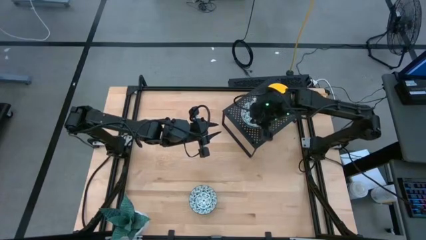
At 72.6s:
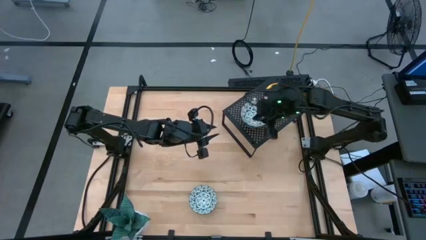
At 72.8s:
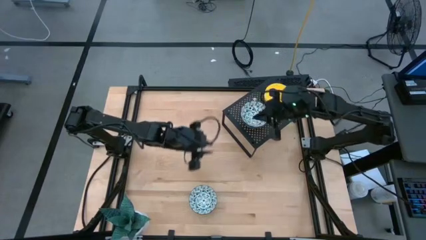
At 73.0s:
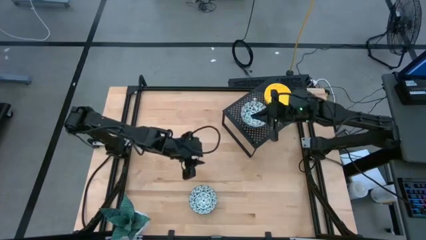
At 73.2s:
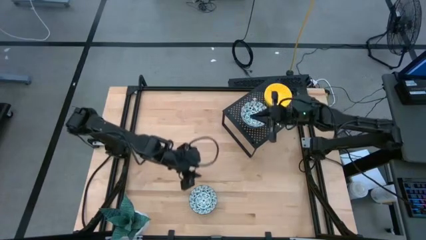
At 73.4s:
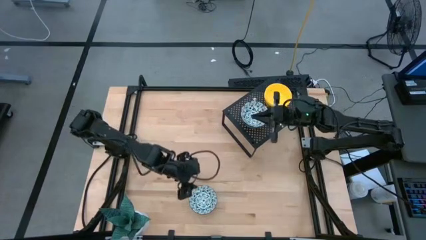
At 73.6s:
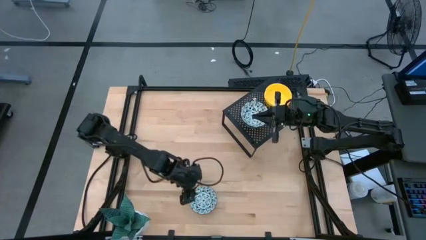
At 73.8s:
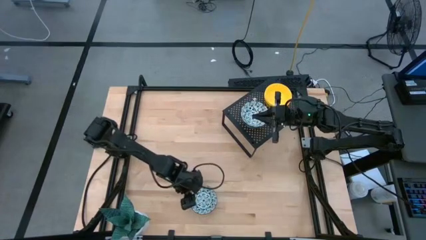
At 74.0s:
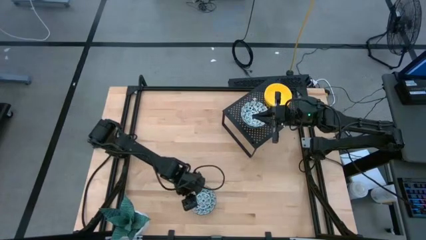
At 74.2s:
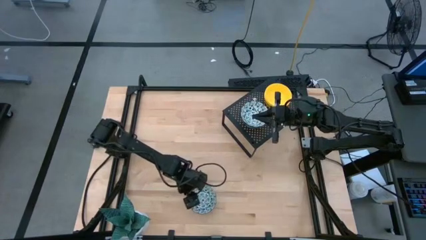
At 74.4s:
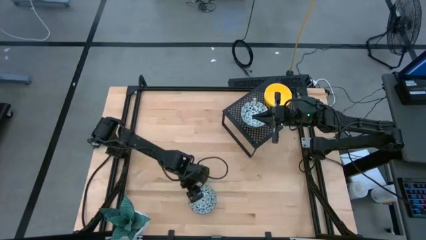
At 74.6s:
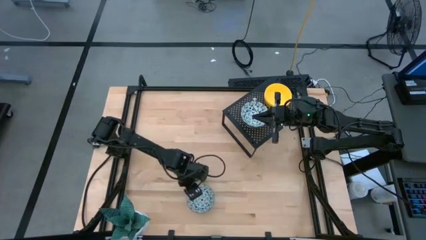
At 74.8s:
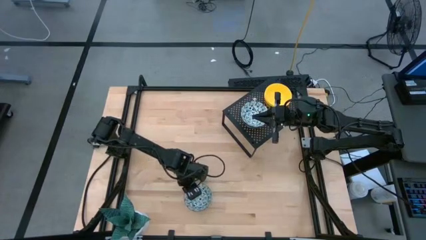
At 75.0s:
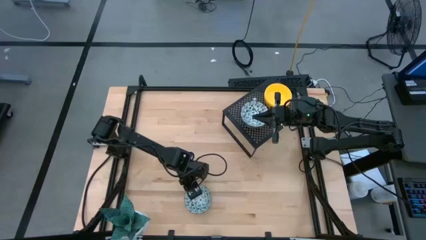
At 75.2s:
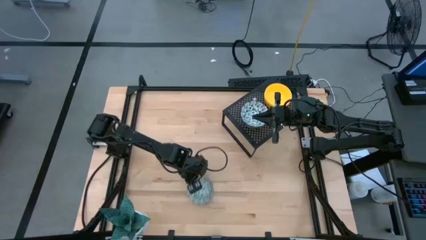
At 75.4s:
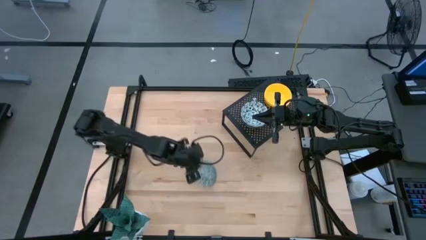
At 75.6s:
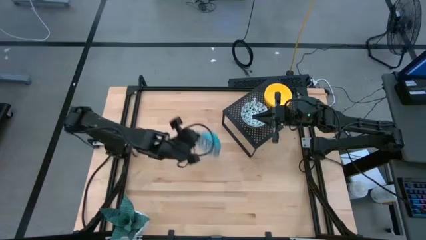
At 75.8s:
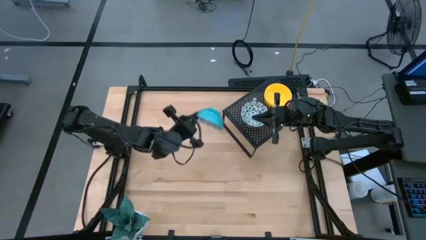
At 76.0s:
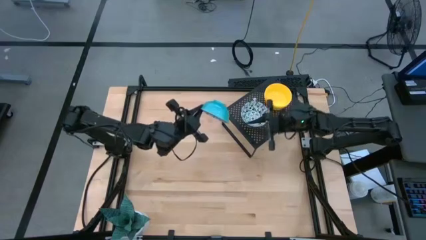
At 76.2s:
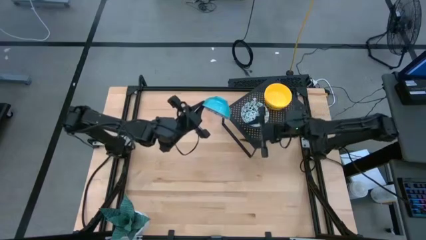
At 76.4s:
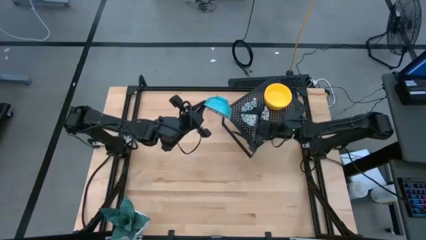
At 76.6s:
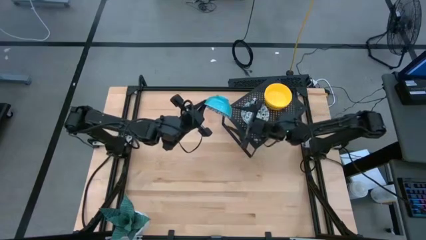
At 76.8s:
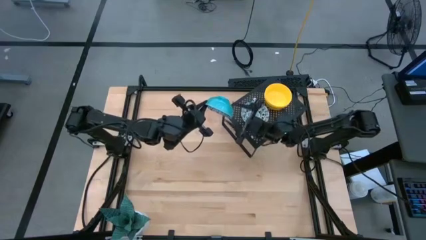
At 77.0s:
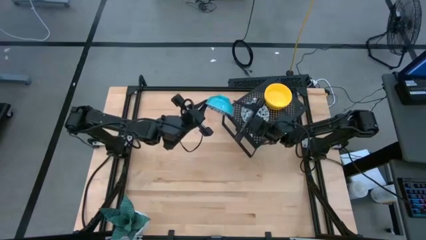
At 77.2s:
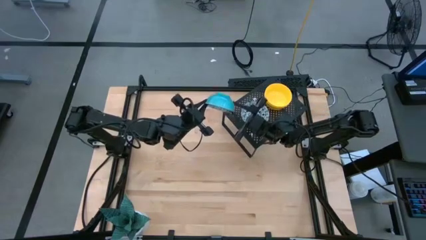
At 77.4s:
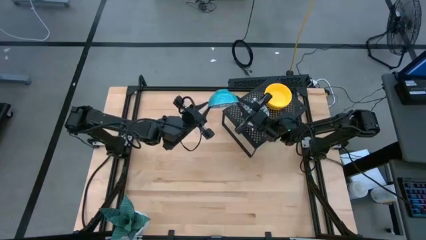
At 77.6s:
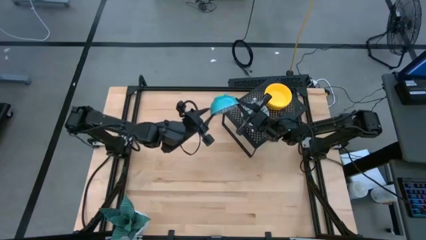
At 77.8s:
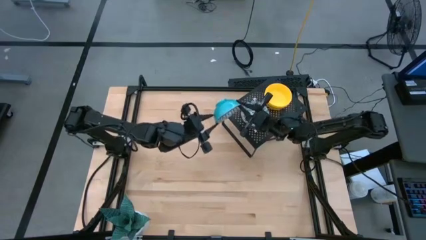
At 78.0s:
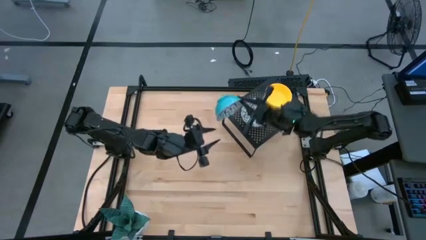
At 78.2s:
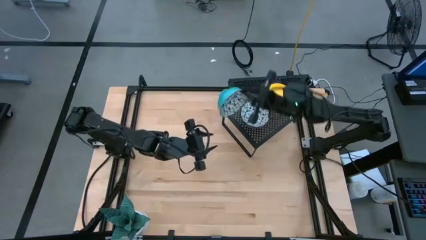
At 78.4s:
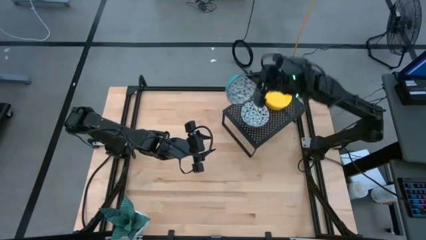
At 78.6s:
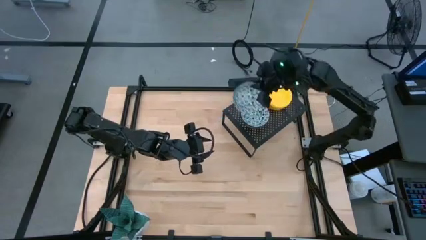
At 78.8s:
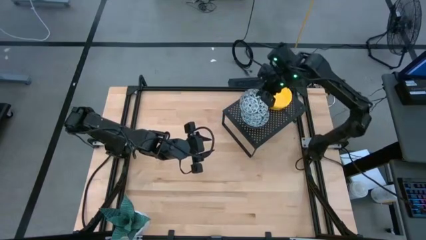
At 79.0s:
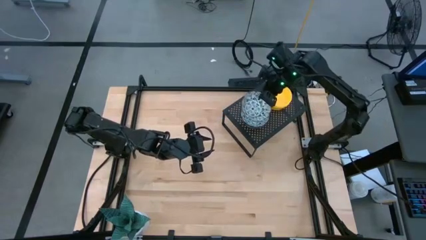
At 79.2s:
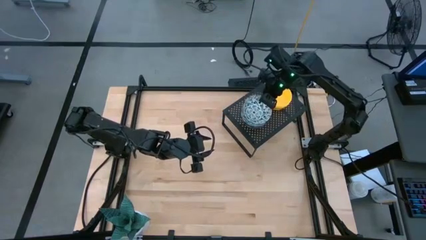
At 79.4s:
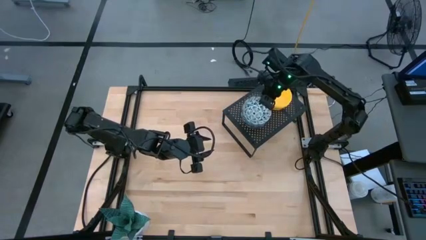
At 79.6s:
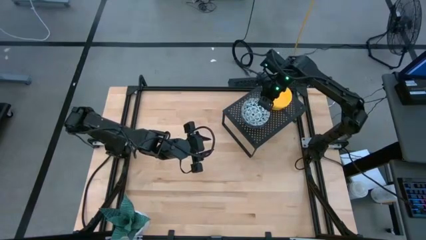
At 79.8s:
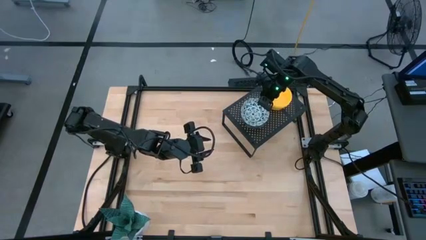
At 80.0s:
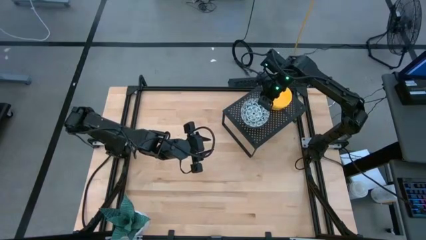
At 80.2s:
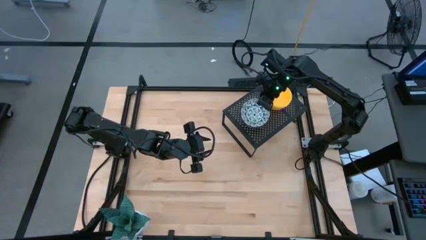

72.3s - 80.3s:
Task: Pick & Place Mini bowls
Stack the blue patterned bowl on the blue patterned bowls on the shelf

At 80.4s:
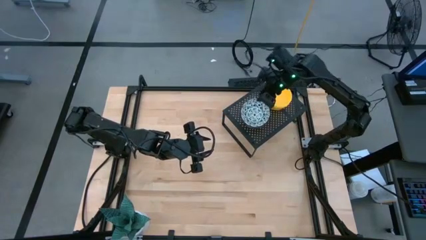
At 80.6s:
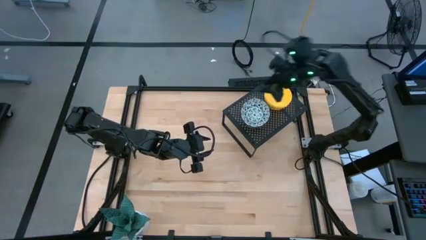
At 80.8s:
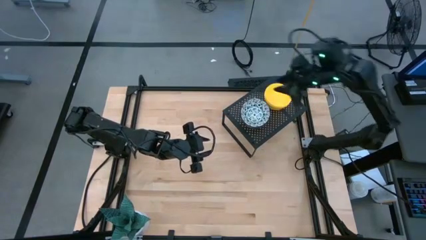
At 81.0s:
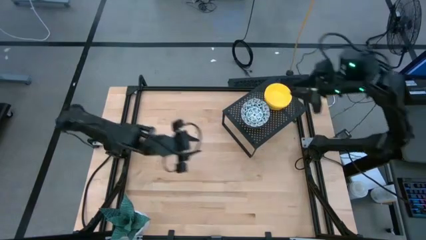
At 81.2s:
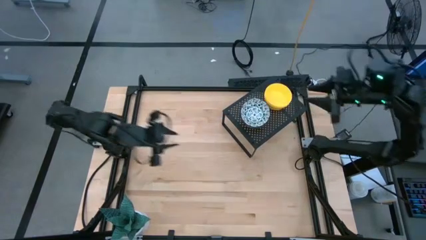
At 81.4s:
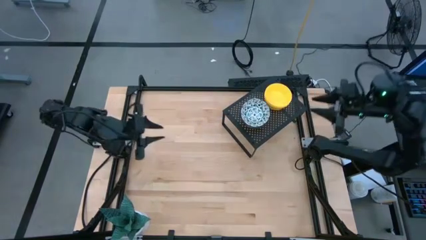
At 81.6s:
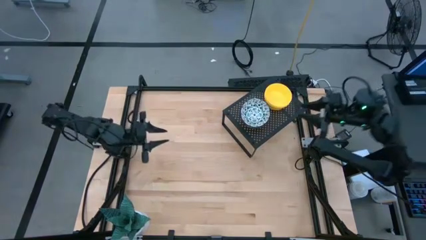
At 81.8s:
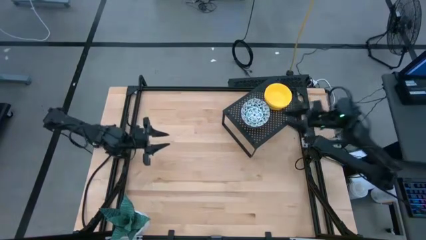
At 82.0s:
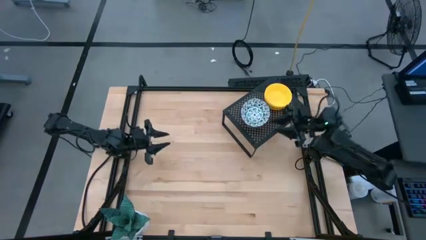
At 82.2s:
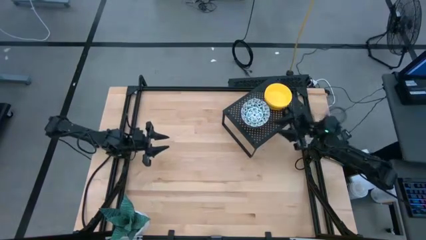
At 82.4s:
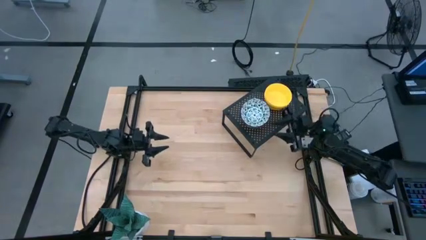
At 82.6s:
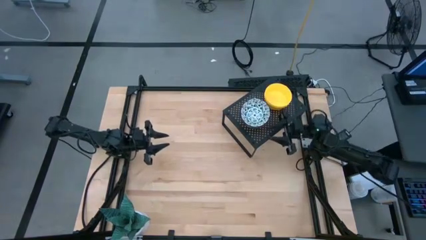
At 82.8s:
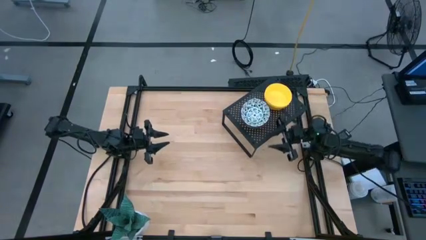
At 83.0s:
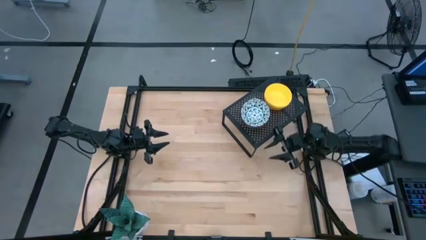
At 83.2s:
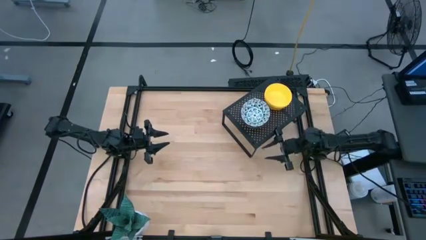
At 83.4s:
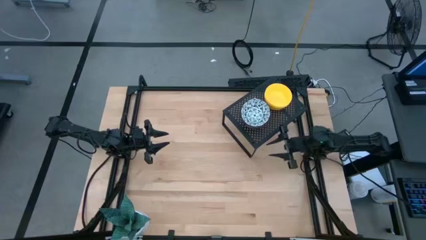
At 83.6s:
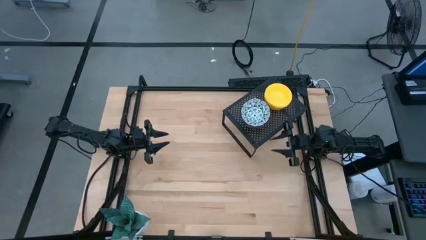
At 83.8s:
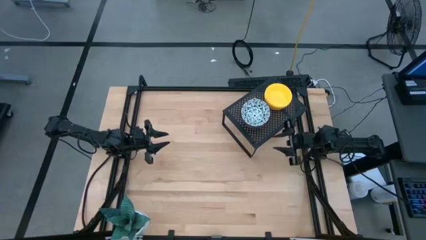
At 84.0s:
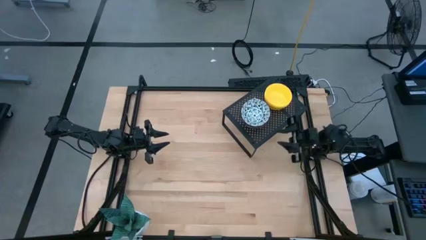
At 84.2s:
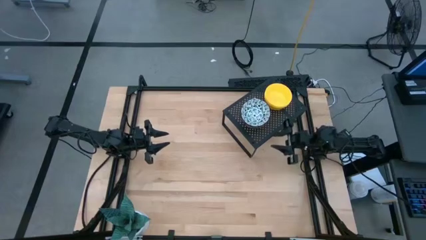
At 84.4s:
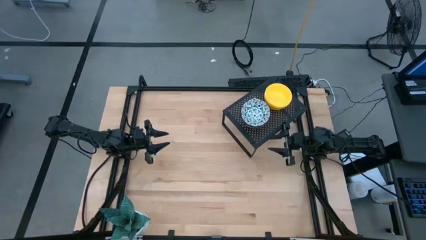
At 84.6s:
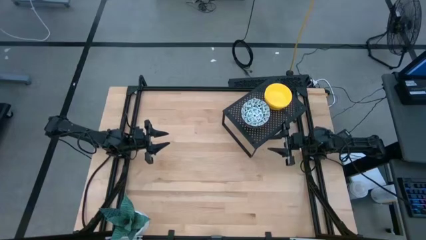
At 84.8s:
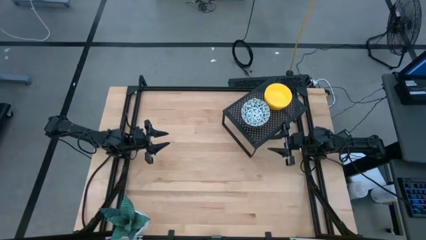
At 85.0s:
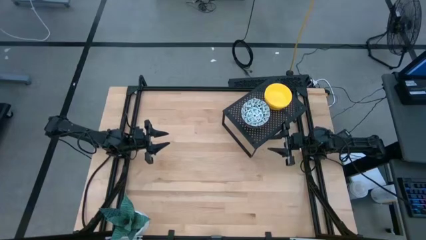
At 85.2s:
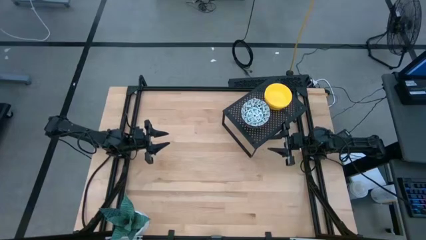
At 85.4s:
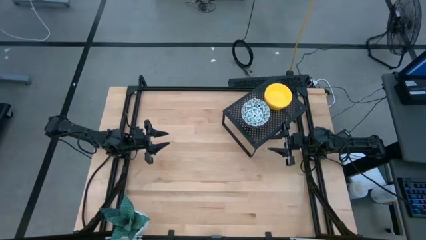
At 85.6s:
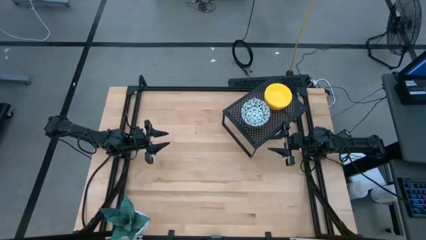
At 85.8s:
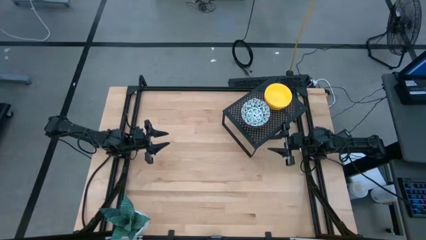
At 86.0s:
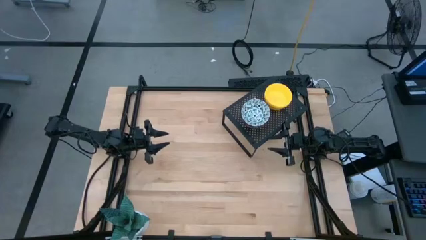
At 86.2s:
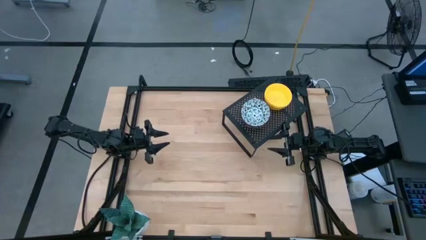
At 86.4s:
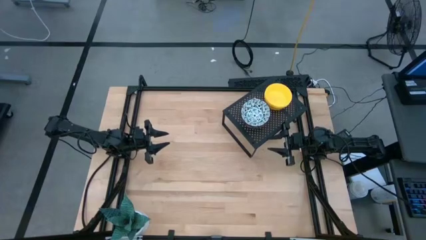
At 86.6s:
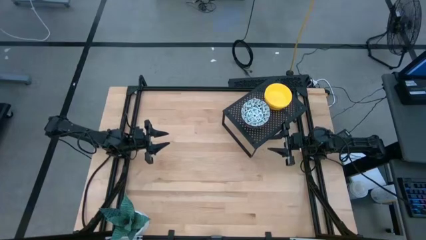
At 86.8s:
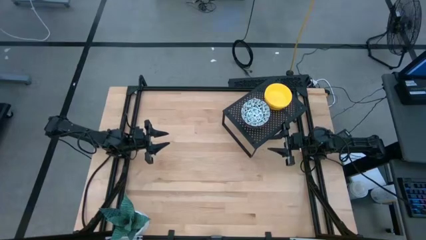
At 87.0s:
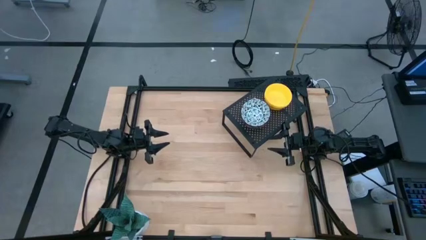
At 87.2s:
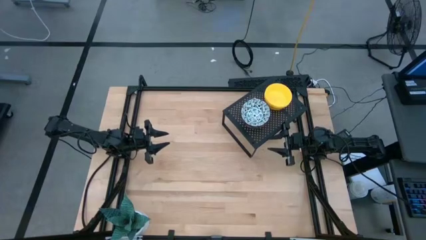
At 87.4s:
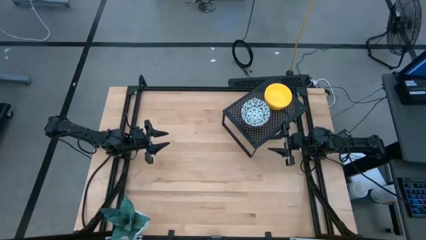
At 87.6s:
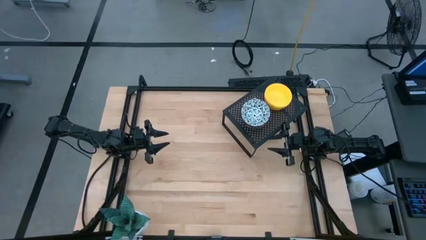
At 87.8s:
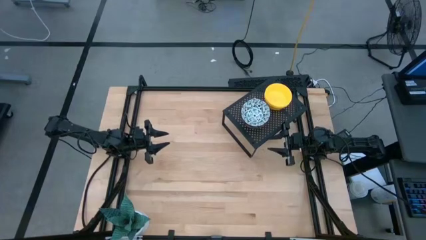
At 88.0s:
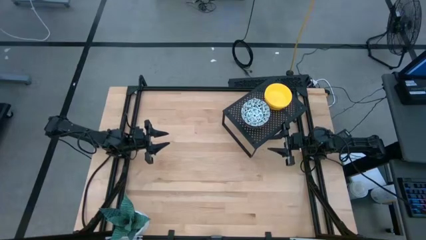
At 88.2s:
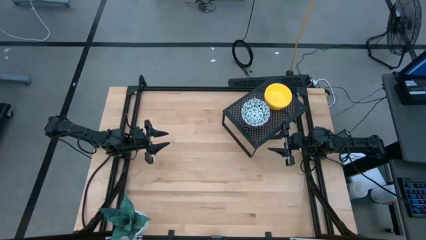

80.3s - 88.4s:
Return to Home Position

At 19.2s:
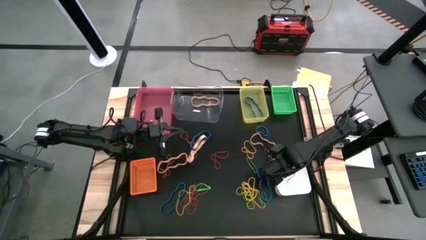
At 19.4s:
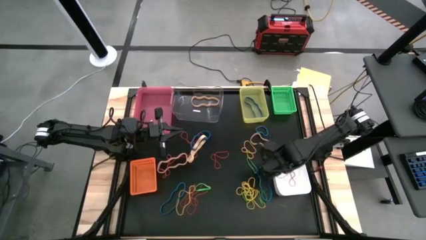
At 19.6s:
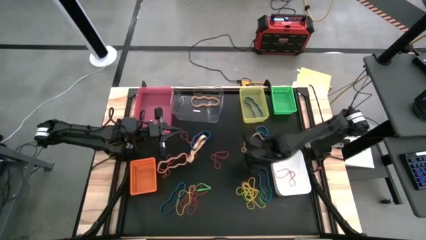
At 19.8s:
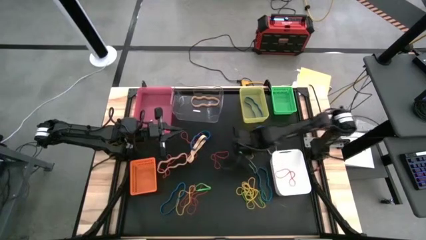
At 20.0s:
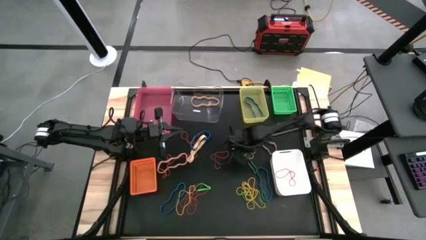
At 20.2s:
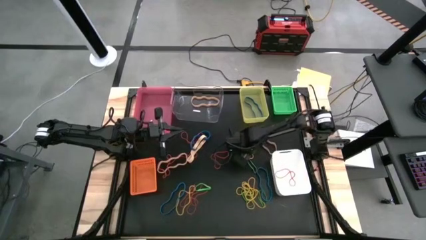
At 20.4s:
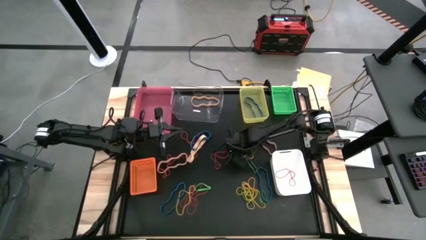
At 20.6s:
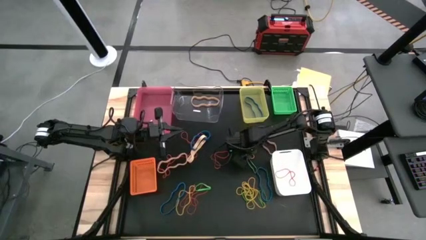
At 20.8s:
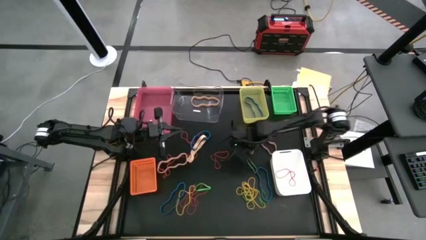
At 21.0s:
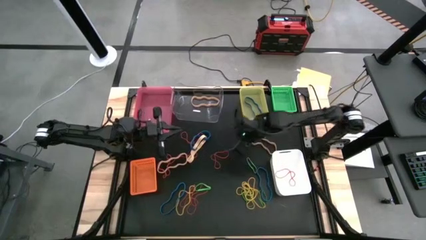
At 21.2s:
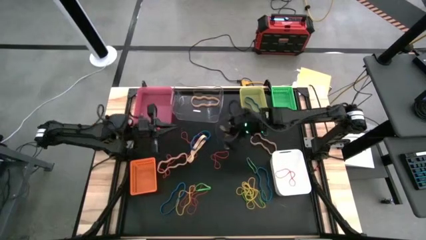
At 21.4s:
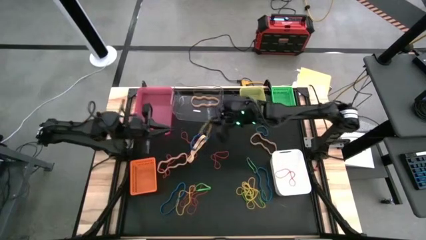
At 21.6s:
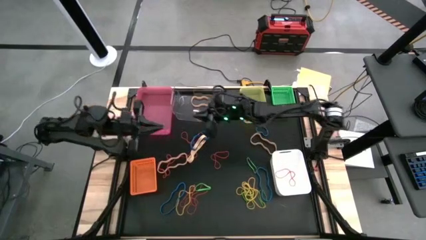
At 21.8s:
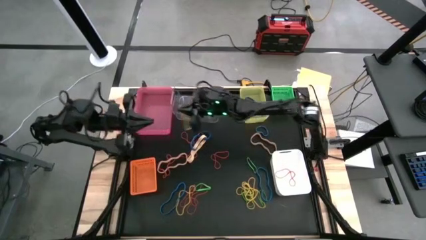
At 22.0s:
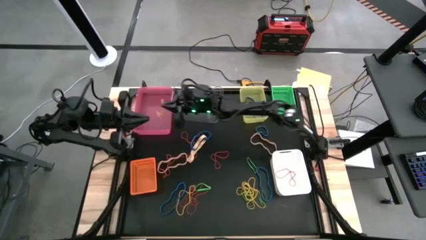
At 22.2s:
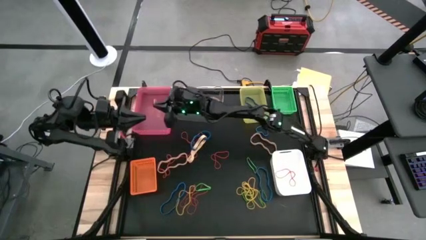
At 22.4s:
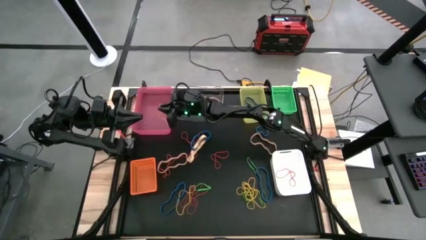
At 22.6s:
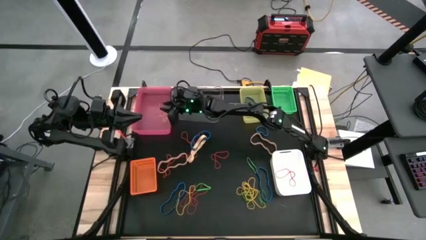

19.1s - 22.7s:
Task: Sort rubber bands into baskets
Put the yellow rubber band into the pink bin
